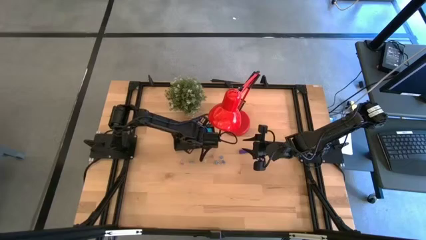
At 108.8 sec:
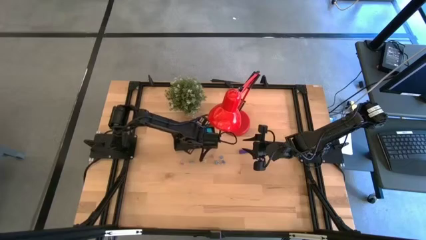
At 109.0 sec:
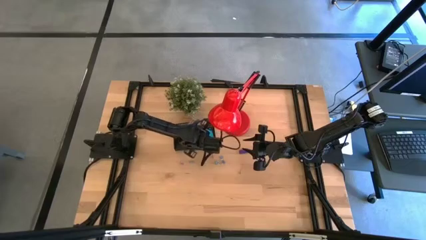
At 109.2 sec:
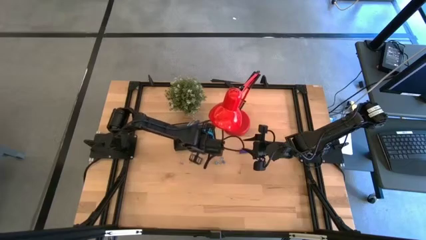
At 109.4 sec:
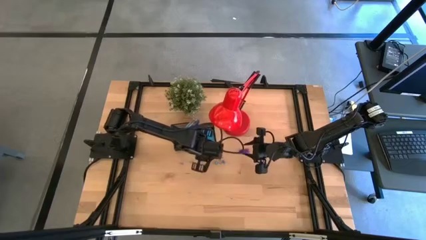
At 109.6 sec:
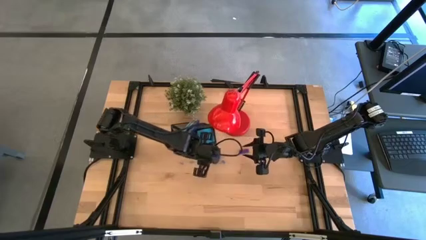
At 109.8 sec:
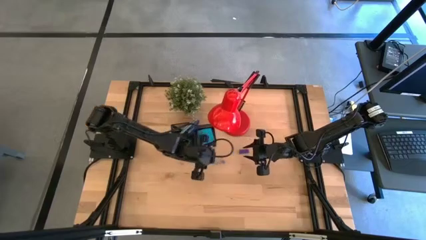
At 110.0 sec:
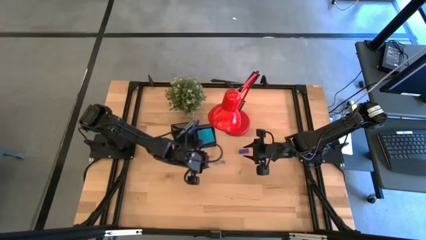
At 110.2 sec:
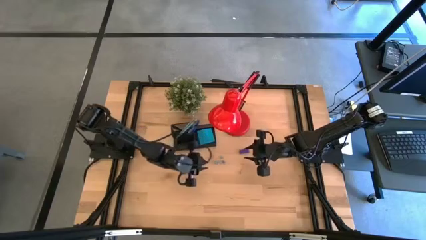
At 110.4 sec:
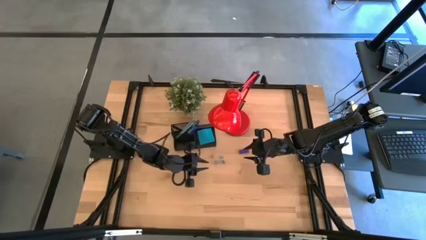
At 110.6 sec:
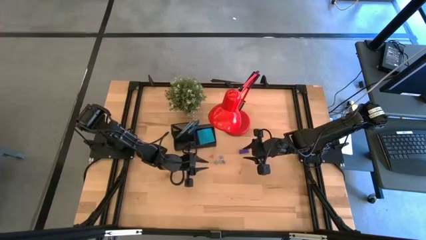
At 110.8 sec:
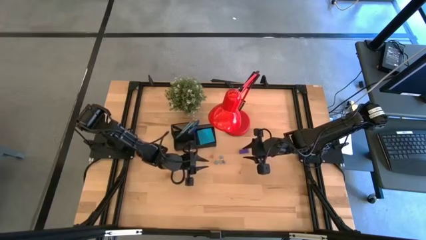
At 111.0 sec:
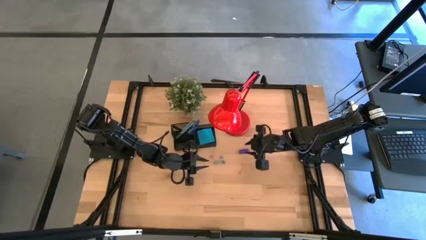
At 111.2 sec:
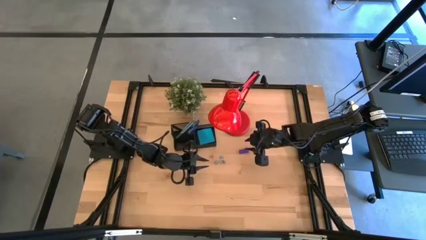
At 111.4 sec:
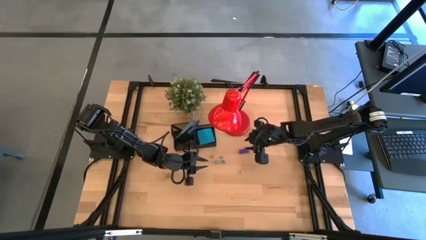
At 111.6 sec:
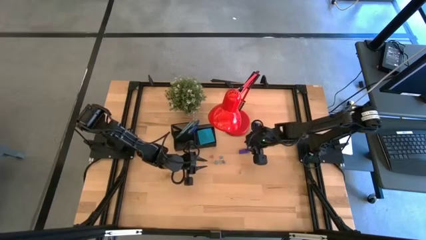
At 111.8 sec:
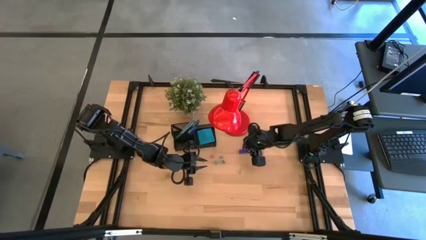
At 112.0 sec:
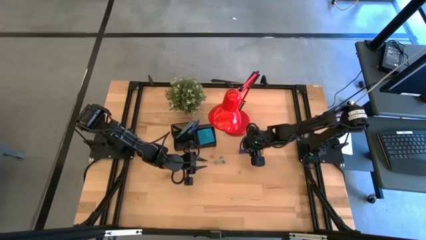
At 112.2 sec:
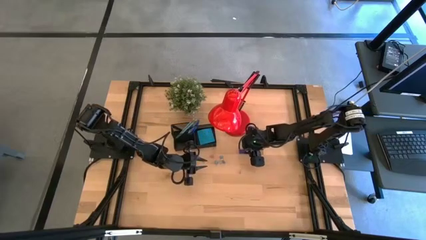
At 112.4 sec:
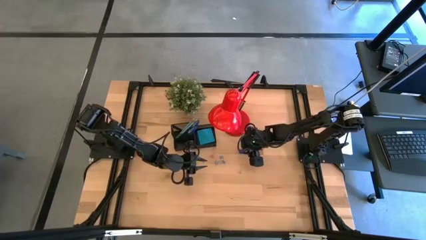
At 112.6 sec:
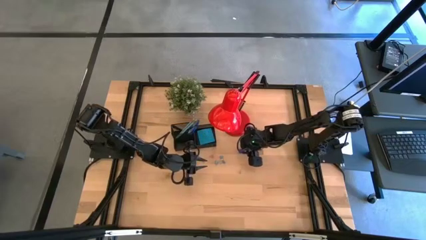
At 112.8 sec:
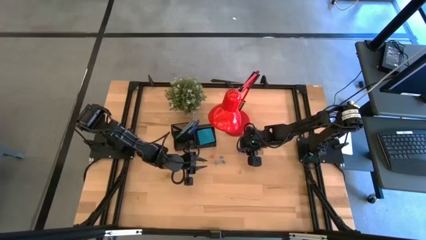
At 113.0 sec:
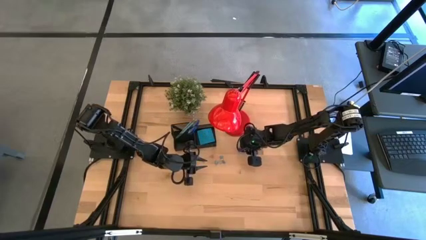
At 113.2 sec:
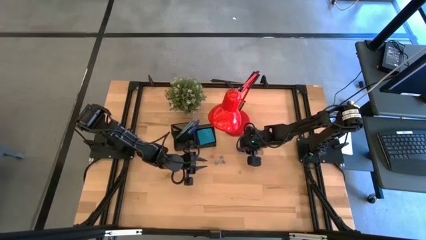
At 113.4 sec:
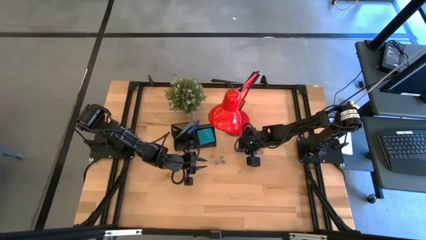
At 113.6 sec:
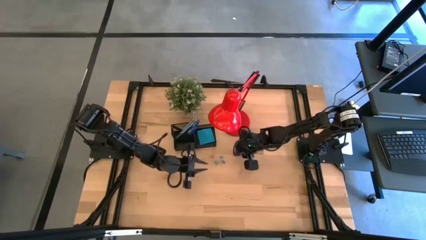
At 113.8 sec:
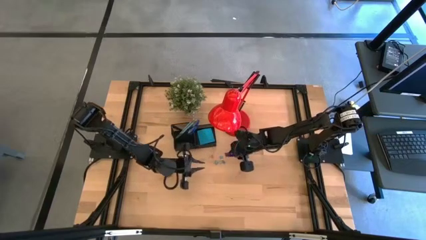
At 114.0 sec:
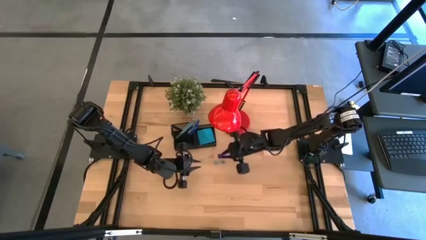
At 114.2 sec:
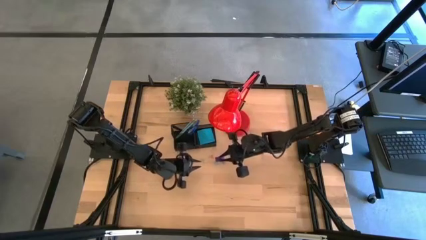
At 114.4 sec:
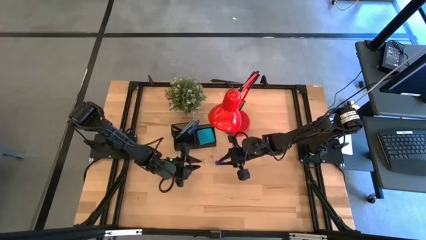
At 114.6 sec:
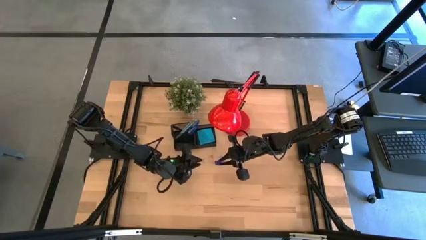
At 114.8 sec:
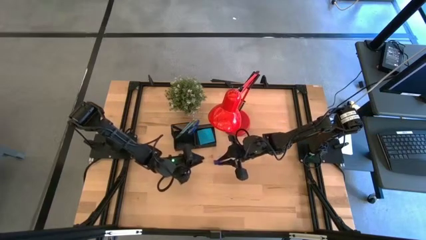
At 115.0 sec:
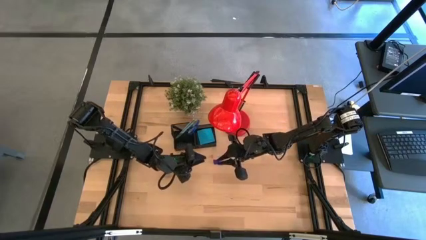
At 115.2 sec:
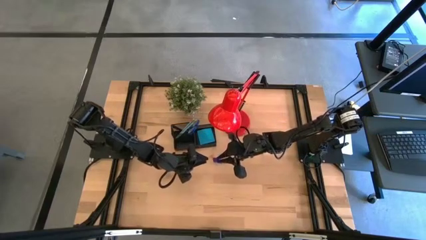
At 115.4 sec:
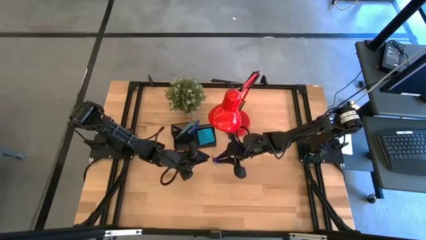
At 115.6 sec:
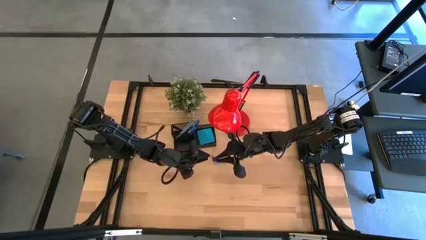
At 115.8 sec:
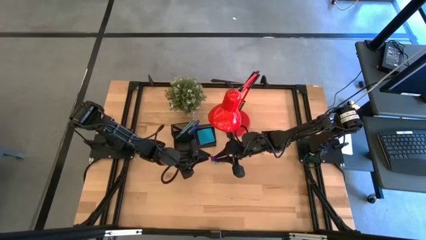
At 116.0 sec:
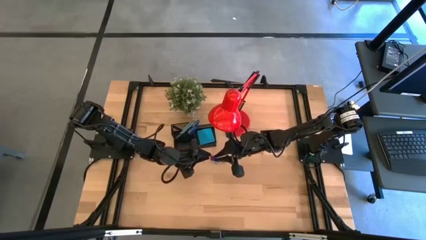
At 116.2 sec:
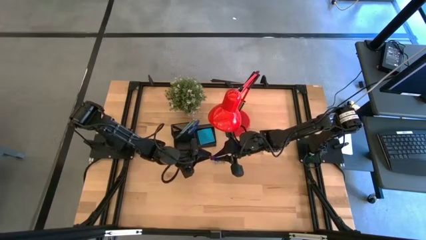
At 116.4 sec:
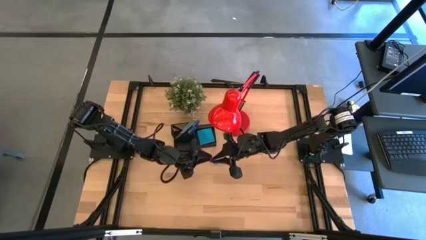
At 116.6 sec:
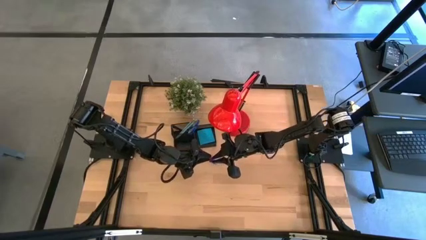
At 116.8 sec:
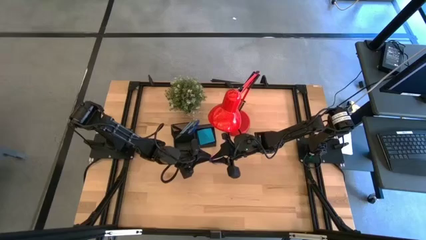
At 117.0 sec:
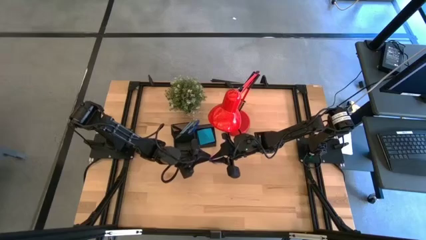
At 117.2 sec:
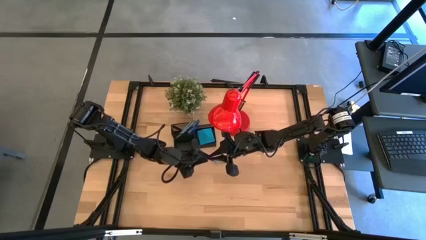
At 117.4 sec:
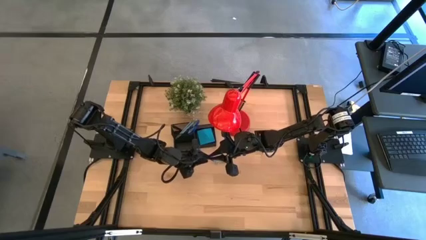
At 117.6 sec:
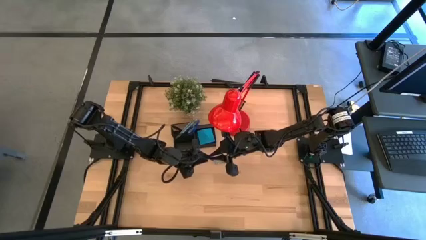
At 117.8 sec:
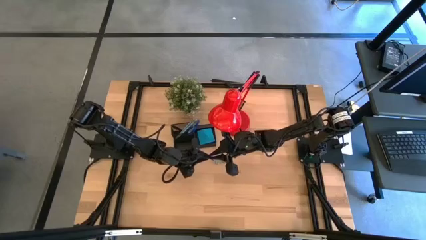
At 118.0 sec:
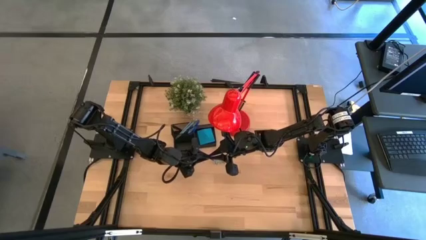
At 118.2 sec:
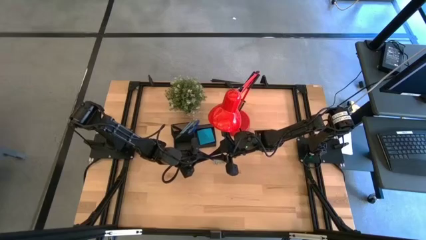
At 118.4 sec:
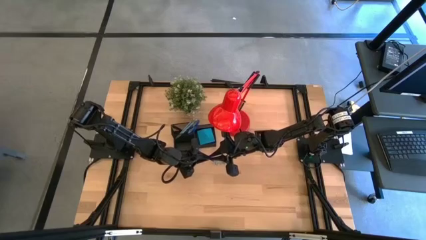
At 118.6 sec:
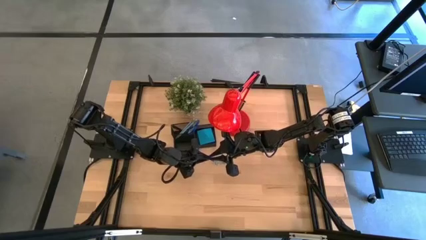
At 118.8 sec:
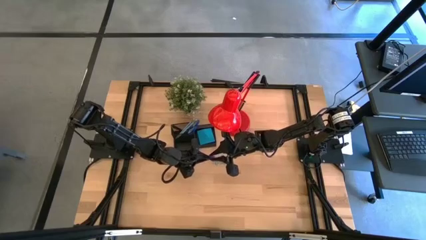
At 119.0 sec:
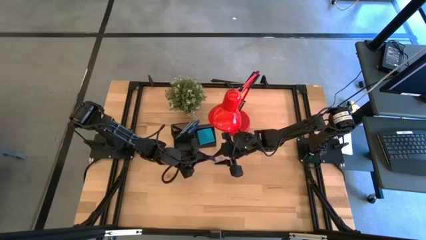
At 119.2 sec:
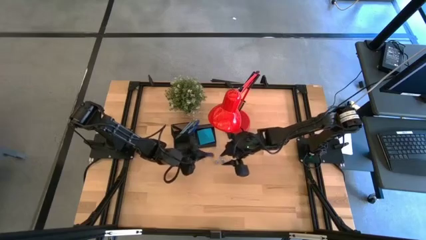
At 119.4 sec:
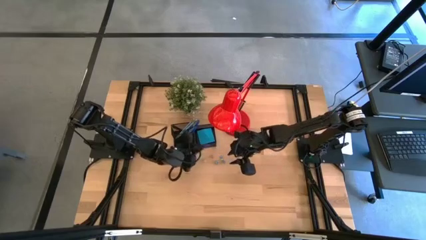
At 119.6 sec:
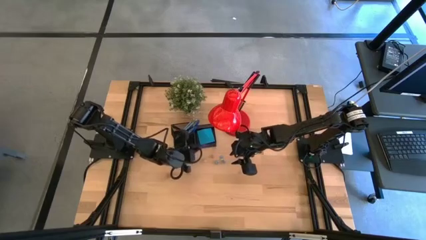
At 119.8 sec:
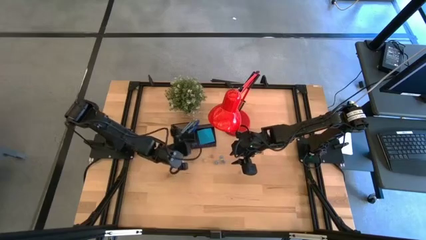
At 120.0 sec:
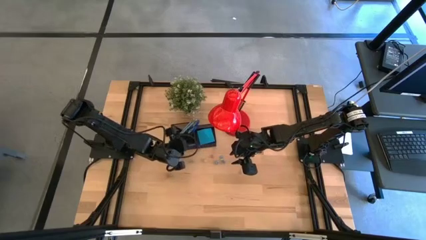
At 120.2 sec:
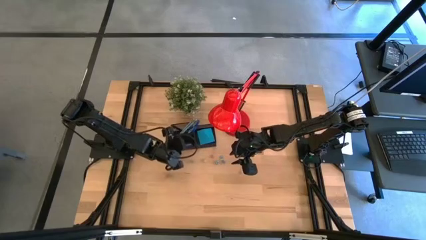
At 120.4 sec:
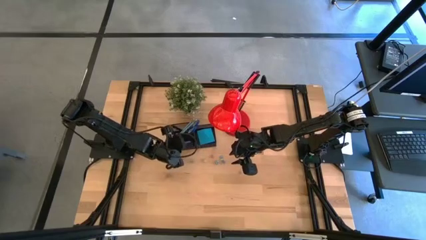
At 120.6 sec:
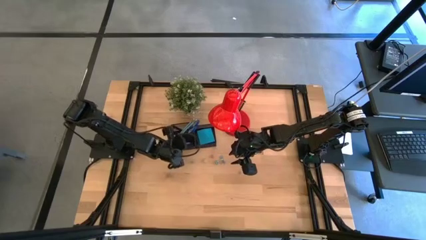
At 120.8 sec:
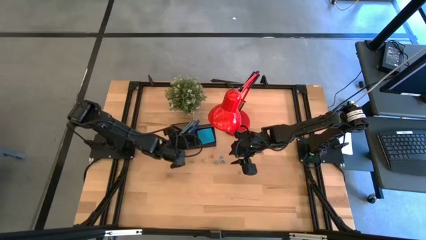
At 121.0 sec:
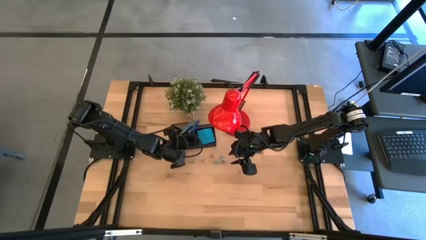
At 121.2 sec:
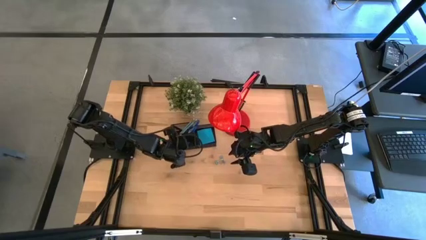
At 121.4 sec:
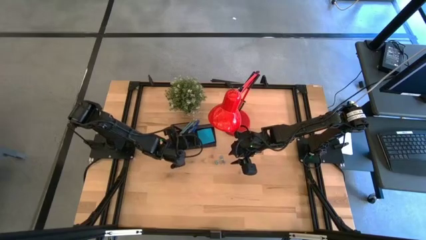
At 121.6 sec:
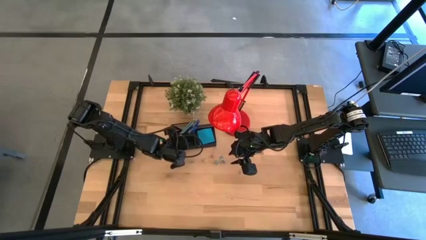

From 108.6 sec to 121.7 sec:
Task: Pick and place office supplies into organizer
Put the blue eraser into the black desk organizer

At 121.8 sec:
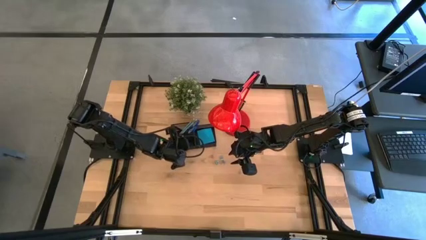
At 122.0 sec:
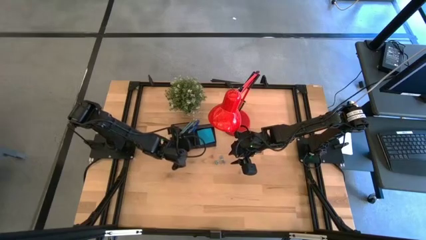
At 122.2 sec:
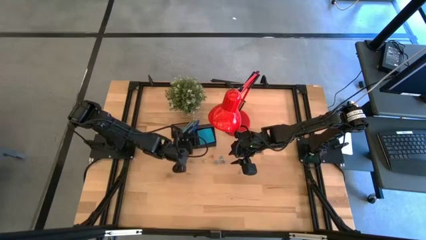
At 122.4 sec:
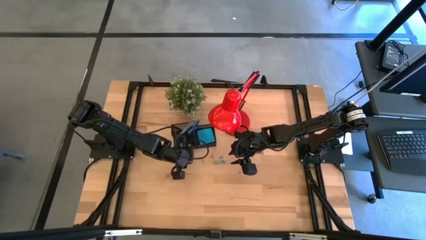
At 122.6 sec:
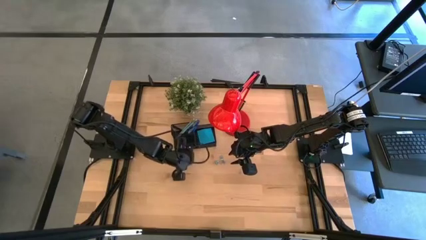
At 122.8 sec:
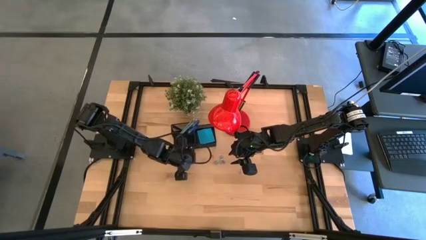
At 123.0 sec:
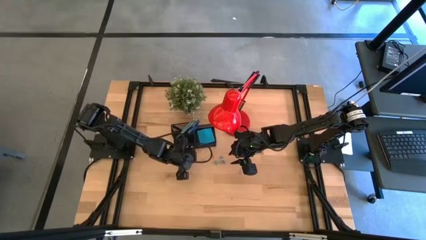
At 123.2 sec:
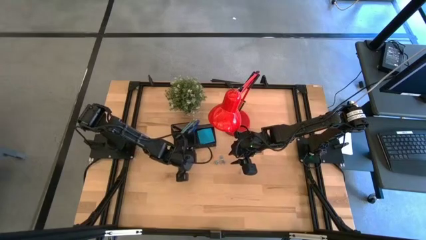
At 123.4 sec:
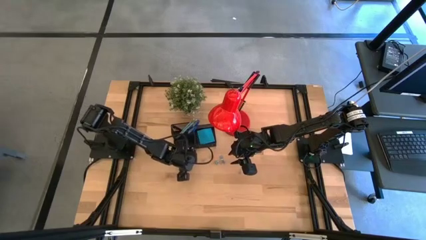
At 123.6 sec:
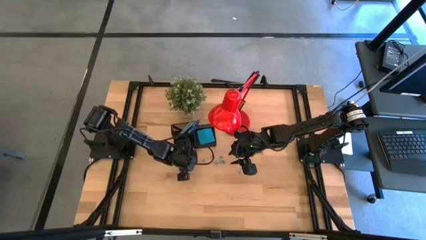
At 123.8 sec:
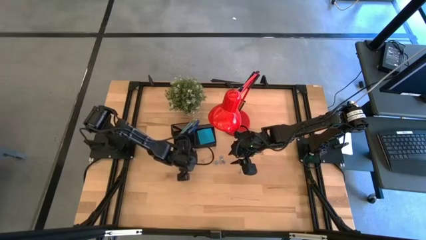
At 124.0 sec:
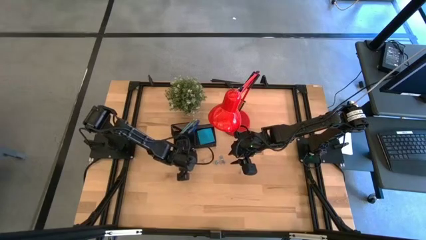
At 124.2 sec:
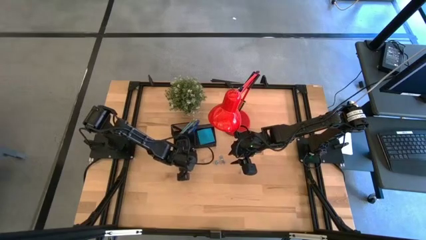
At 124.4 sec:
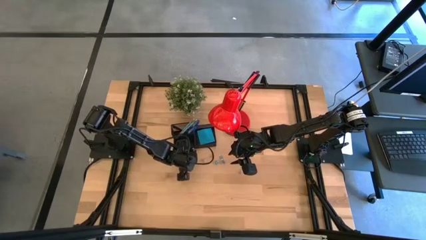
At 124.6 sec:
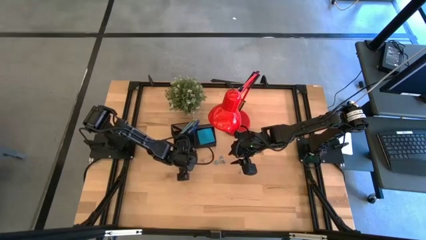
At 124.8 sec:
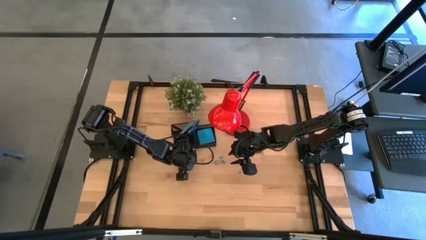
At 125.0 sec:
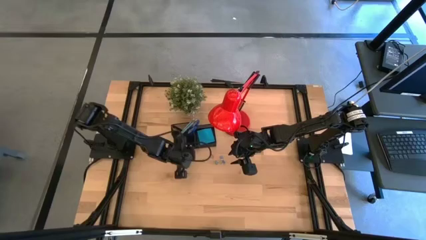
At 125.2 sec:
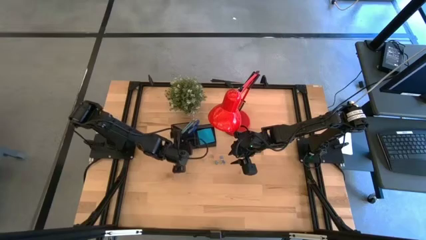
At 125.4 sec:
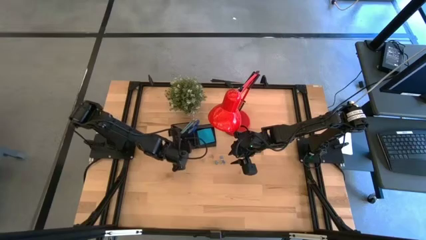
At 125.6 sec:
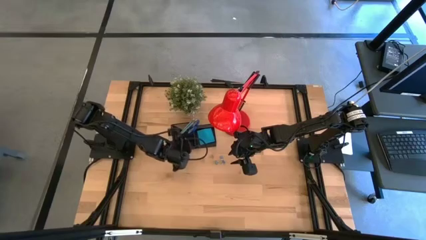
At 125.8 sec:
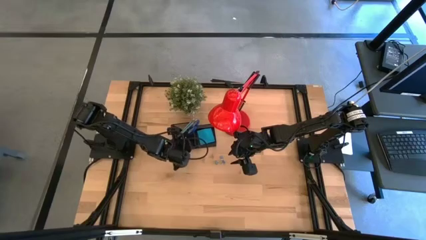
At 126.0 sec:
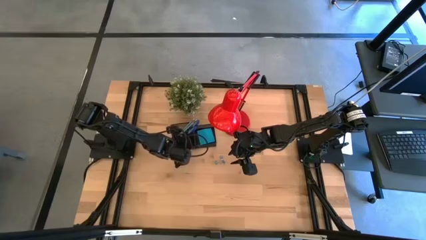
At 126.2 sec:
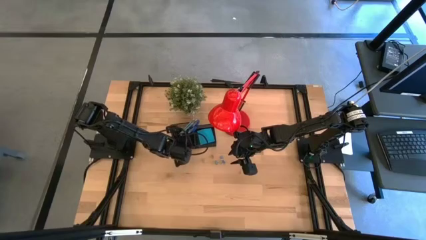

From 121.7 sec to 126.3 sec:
Put the blue binder clip into the black desk organizer
